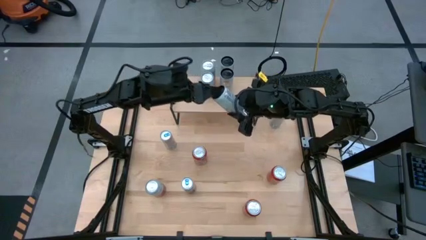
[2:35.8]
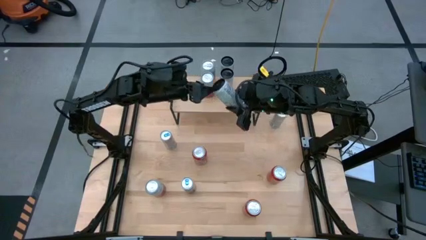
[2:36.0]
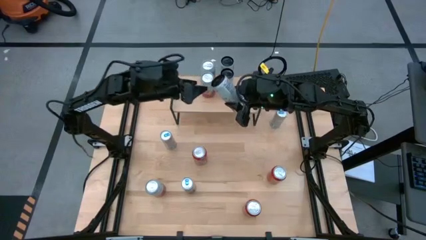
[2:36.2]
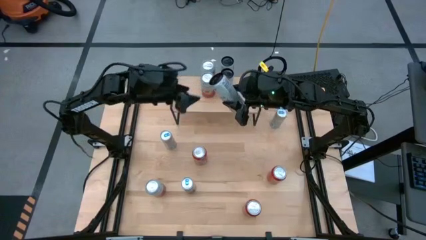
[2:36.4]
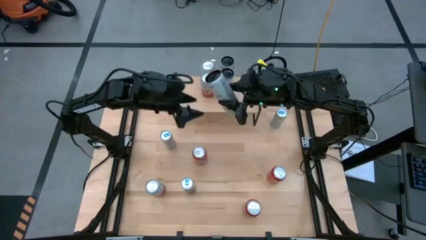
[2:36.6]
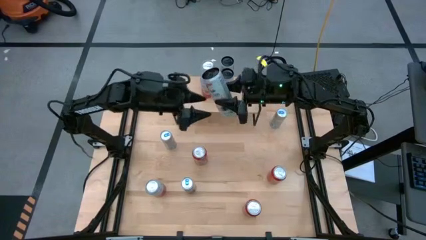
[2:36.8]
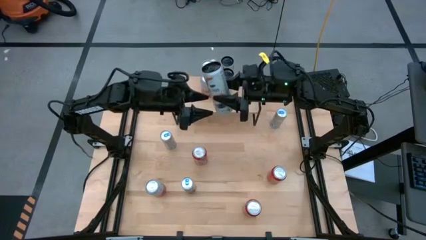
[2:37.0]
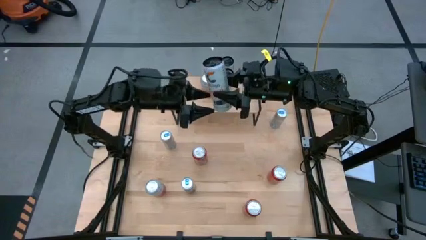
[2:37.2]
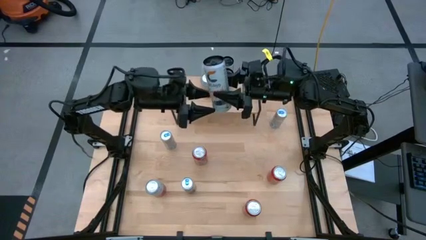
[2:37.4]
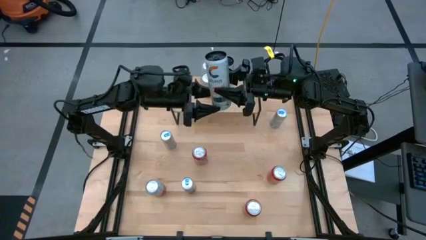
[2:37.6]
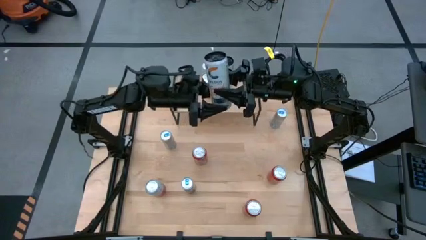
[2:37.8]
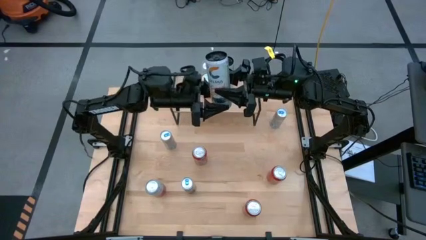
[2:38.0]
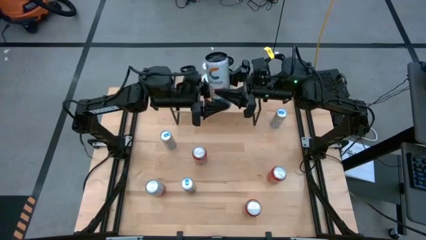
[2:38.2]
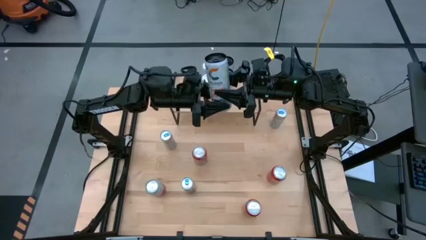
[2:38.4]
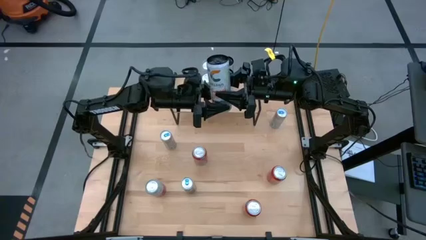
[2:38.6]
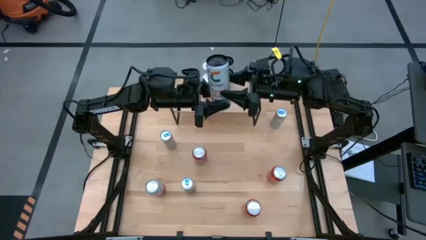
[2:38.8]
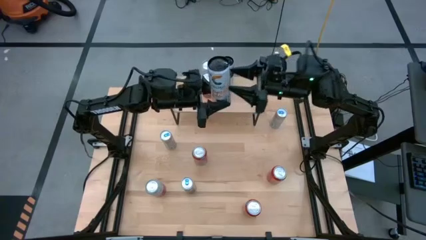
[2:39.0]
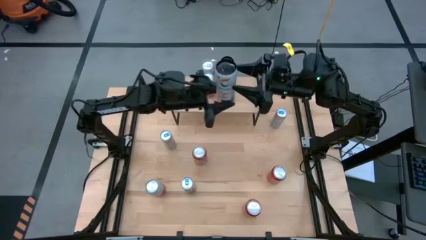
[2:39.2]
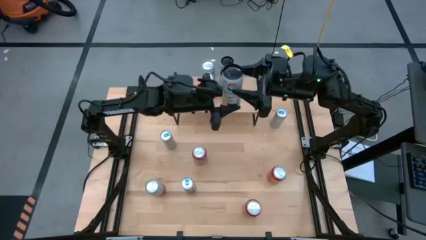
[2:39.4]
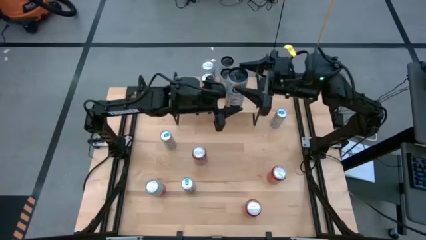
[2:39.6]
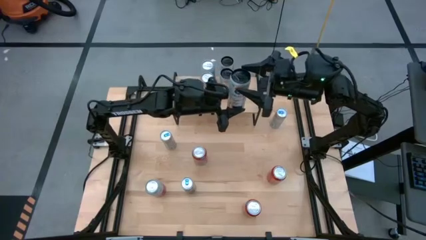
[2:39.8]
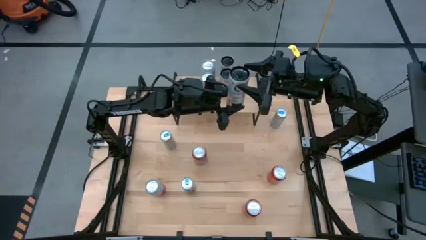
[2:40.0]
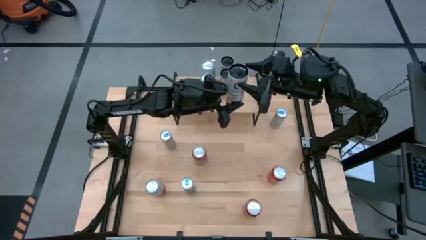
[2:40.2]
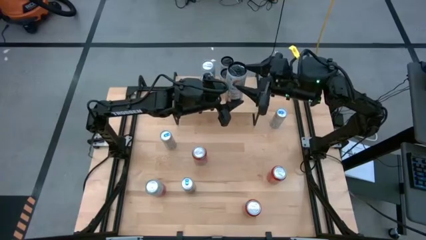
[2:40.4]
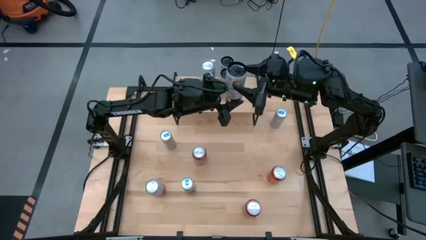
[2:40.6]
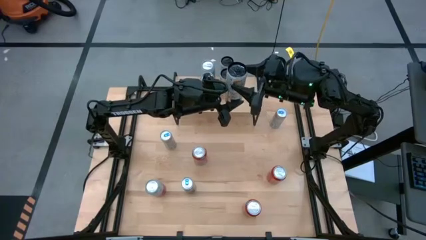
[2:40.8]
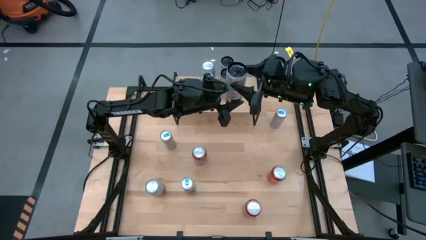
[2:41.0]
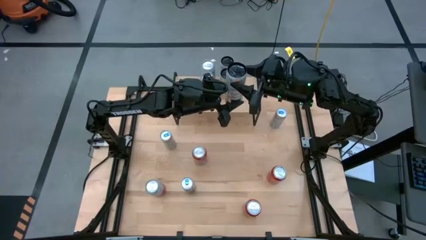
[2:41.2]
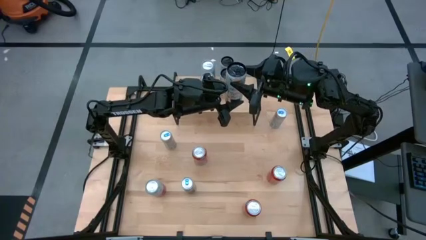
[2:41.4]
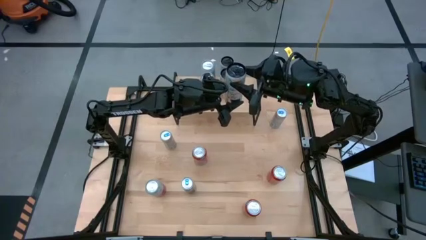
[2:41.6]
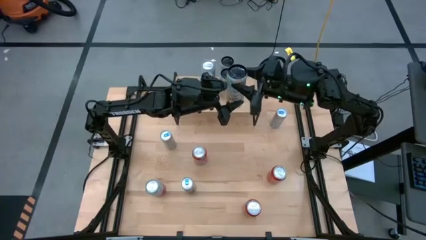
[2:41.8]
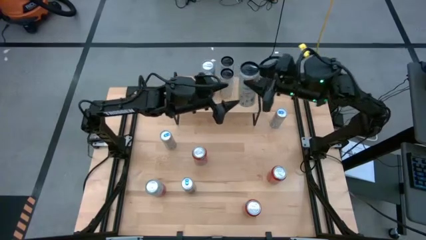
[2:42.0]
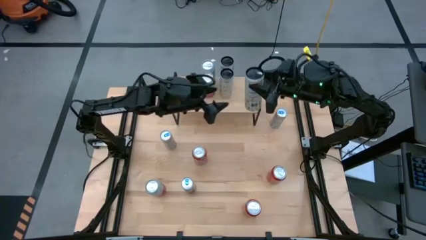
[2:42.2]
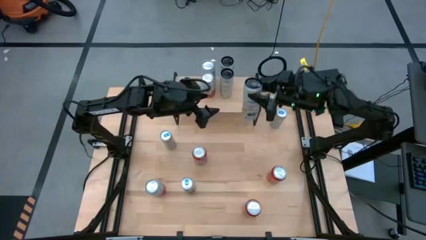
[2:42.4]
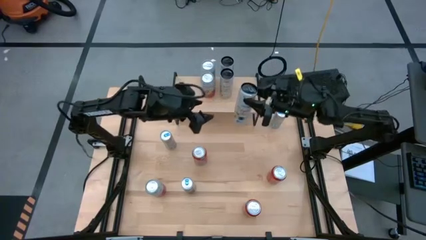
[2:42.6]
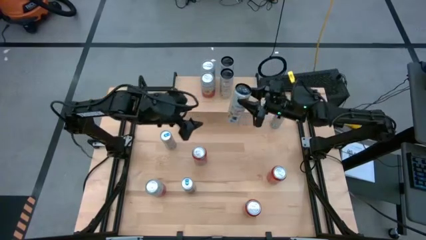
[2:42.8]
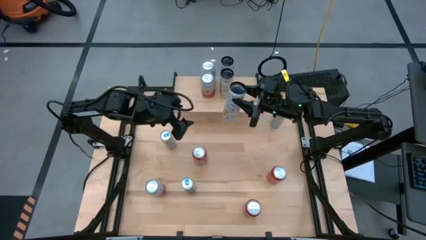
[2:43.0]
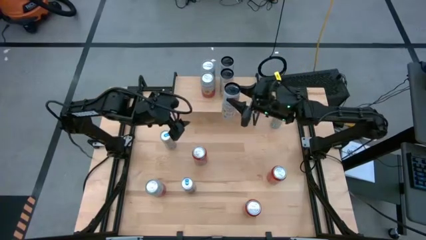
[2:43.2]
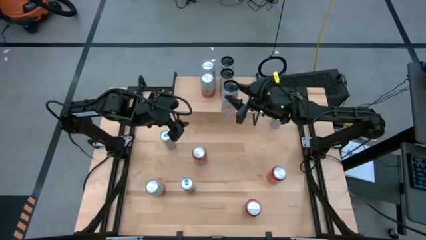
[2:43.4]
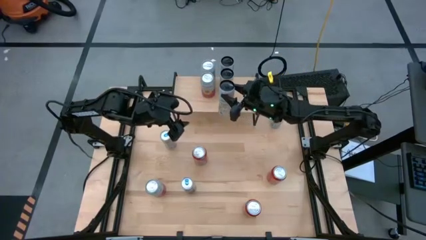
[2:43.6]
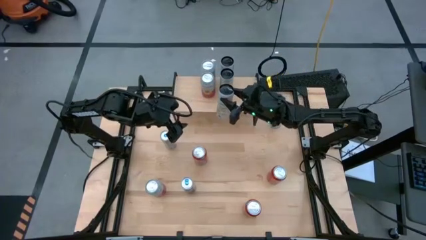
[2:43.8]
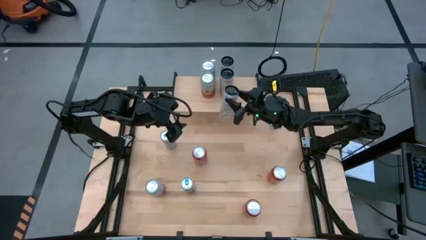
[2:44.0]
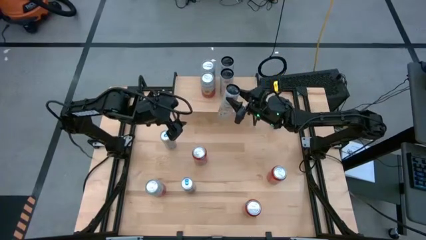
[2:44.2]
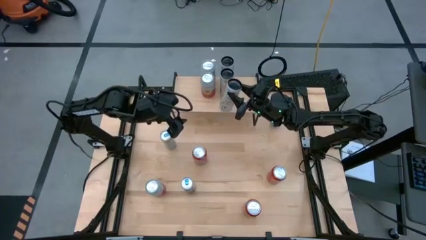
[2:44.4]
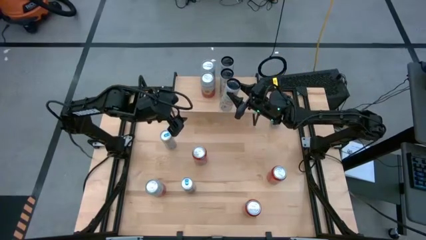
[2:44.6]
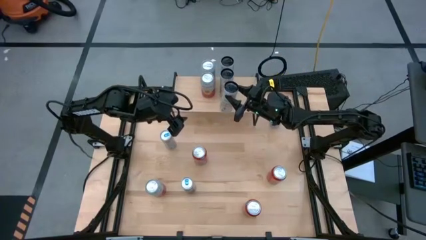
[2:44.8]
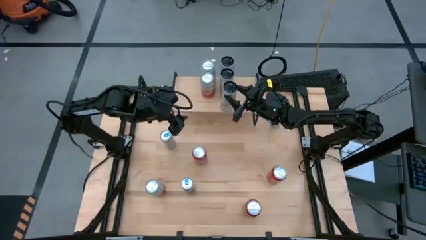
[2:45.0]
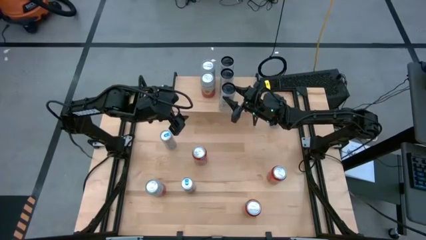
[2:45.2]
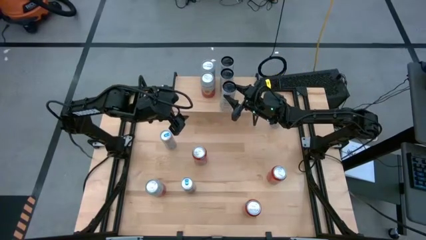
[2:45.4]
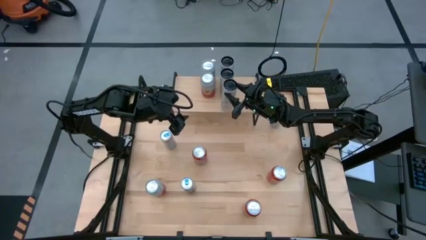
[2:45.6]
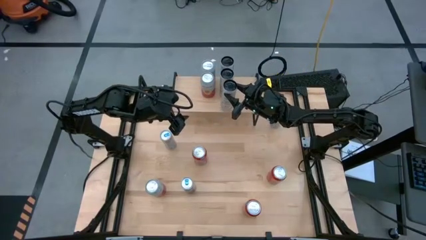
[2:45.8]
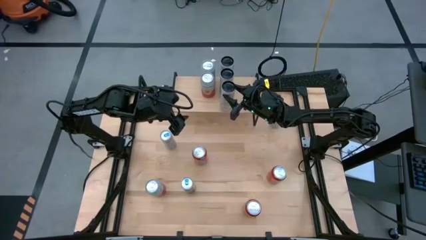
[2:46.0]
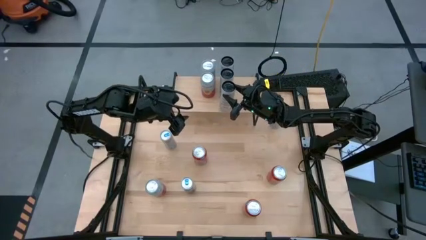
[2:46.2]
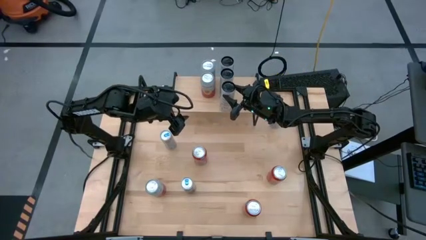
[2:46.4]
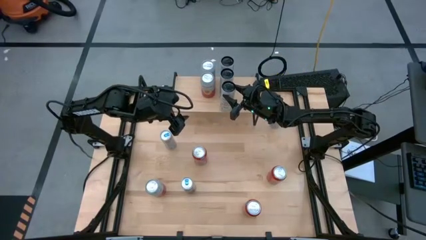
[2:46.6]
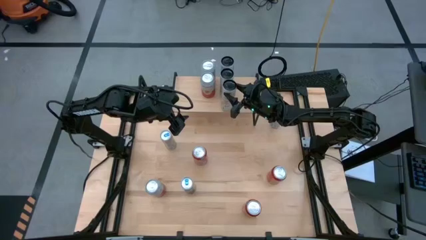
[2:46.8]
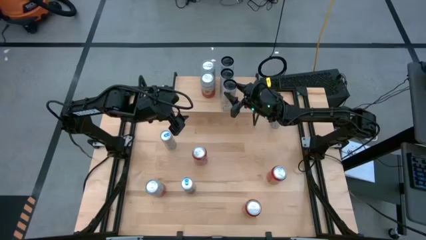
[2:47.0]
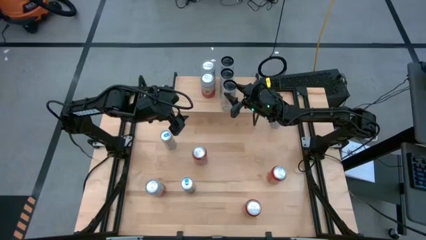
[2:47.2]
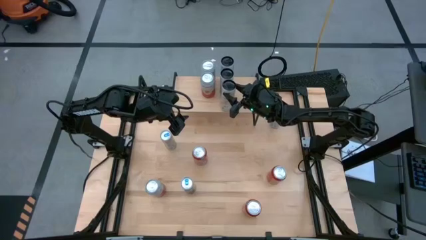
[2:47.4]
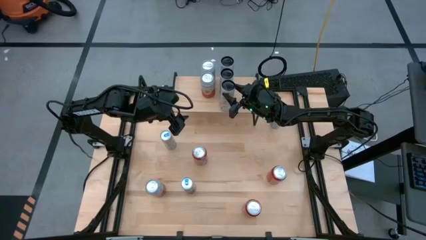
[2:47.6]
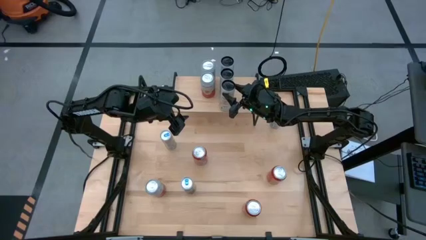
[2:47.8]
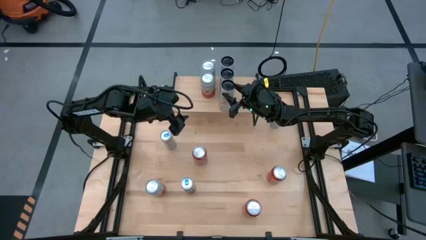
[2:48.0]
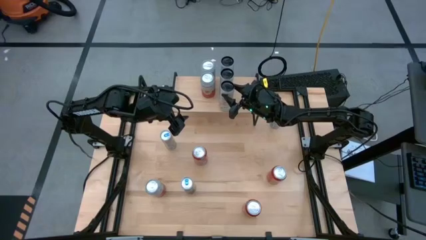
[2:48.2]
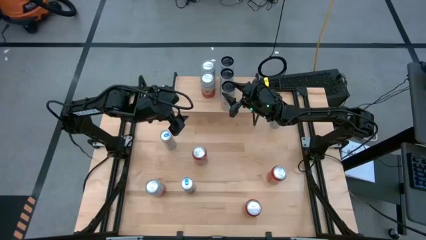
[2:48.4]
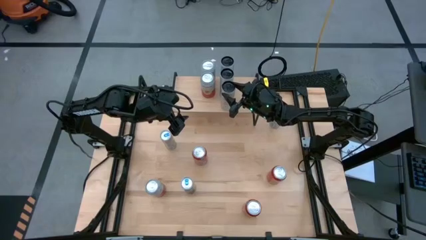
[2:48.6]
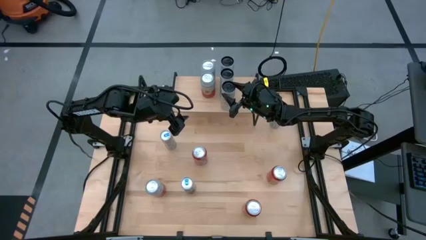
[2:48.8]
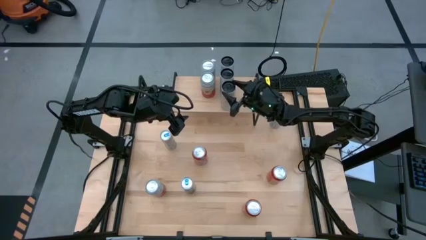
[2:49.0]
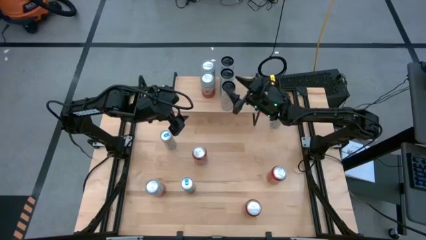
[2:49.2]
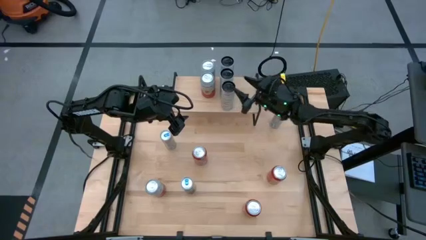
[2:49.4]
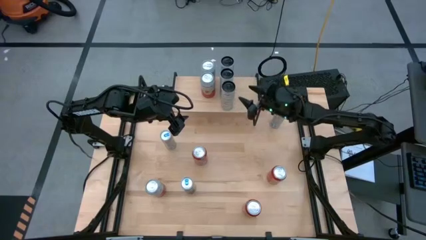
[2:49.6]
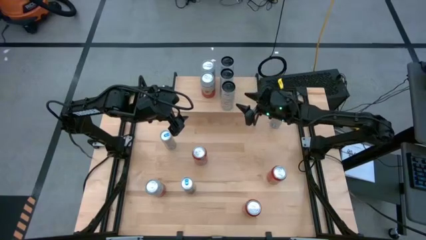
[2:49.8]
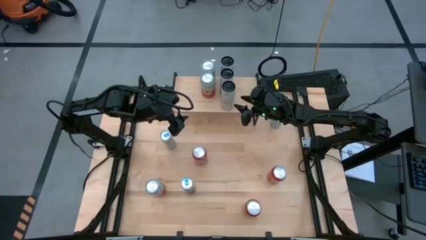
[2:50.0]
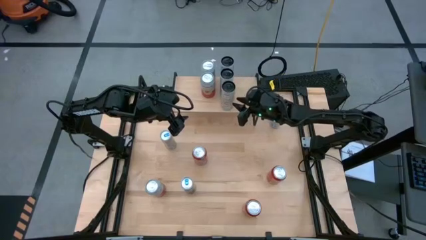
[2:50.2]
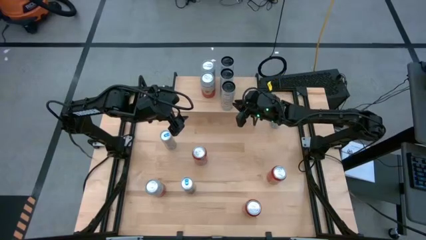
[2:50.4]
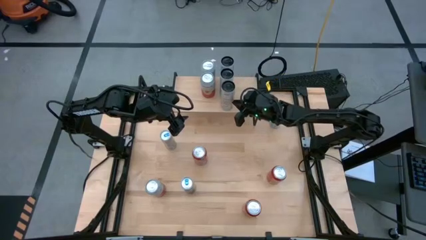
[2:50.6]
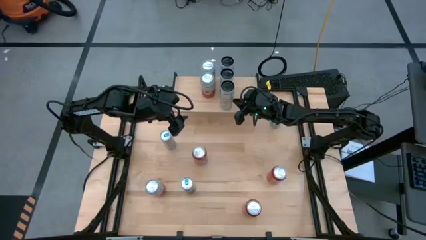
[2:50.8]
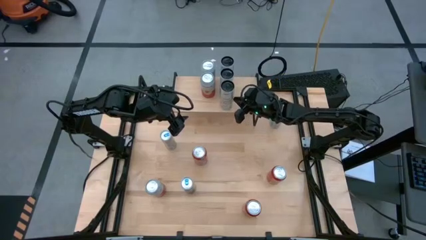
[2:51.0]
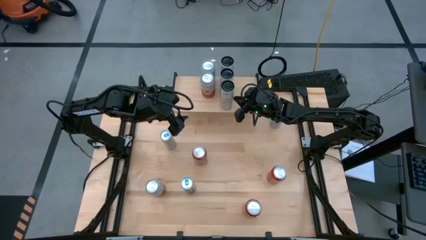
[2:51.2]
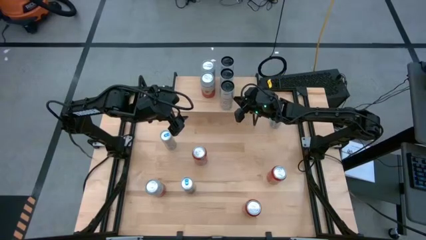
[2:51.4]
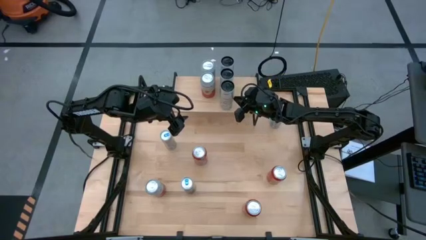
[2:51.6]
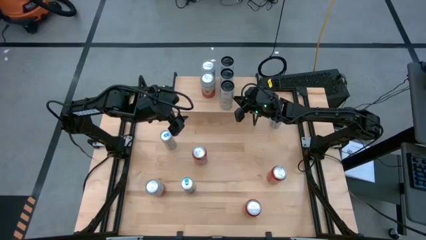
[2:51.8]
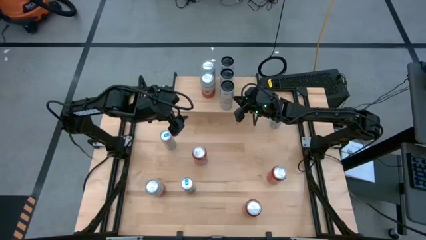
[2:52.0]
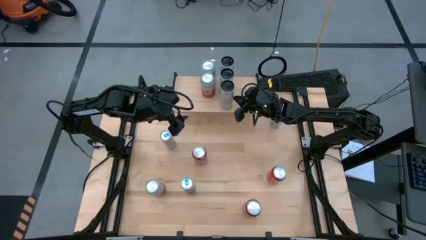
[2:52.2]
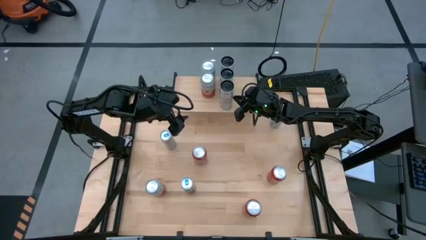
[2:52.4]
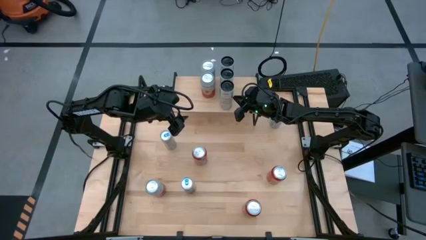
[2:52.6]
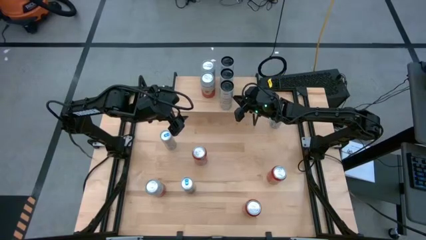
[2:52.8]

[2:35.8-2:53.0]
Task: Place canned beverage on shelf
Put the white-yellow soda can aligned with the other white-yellow can on the shelf
